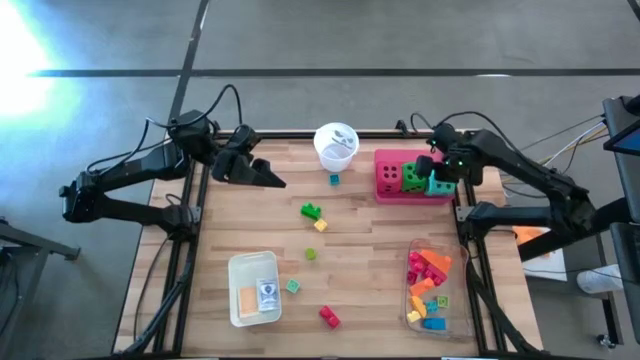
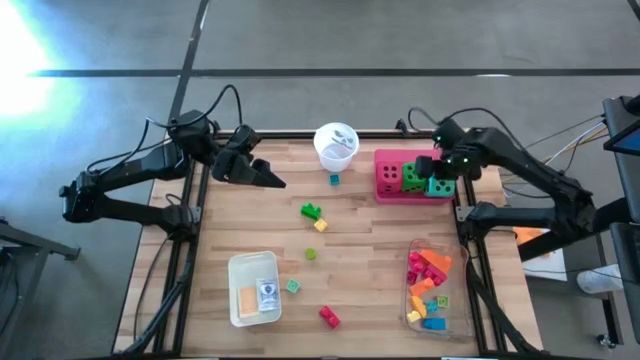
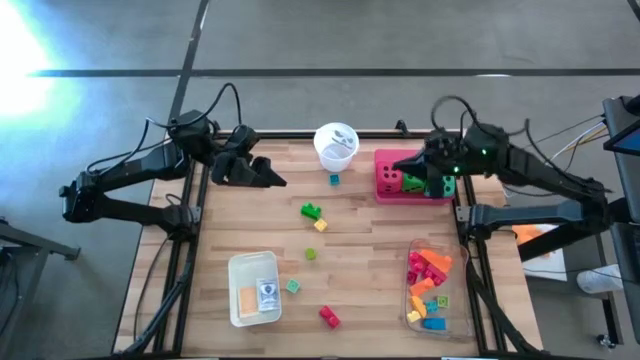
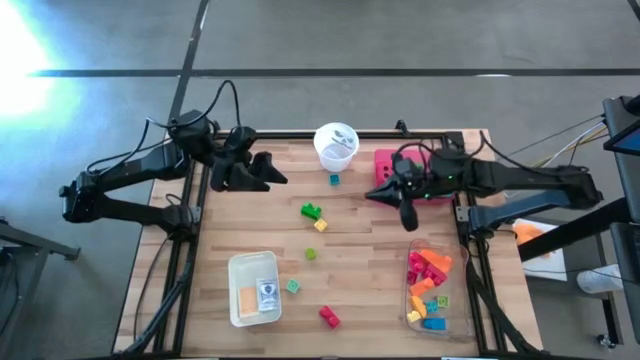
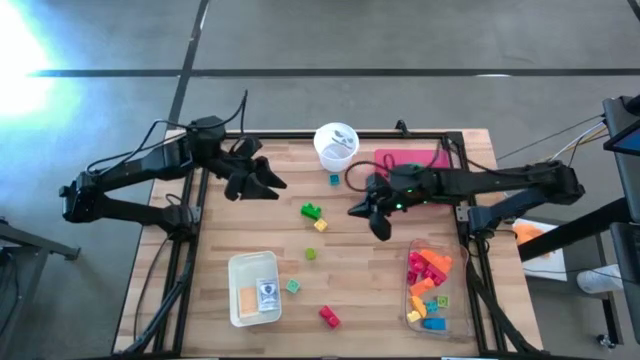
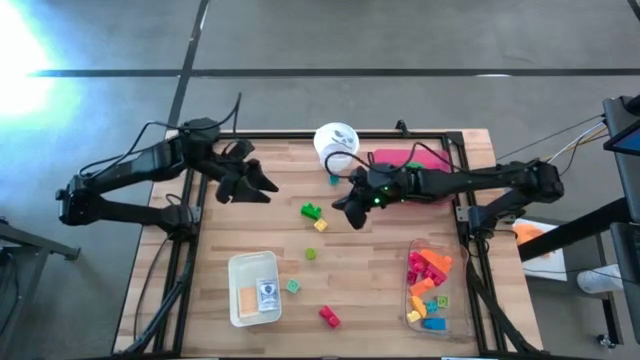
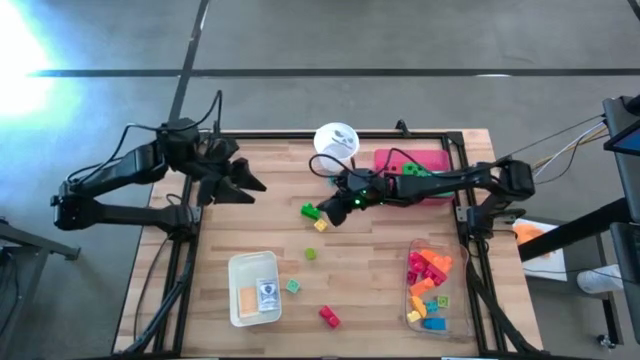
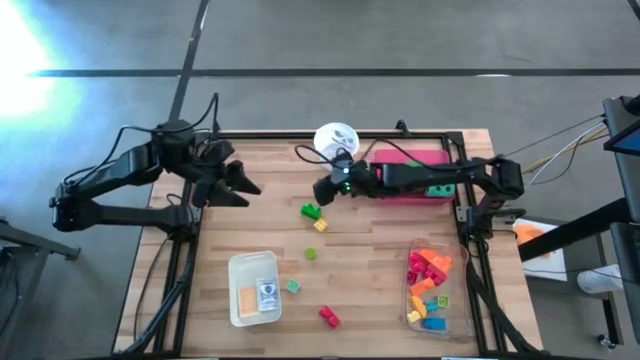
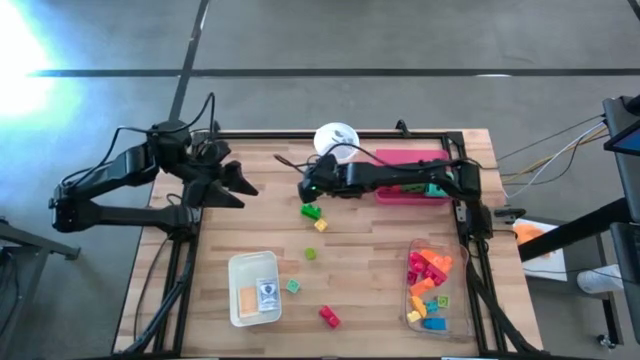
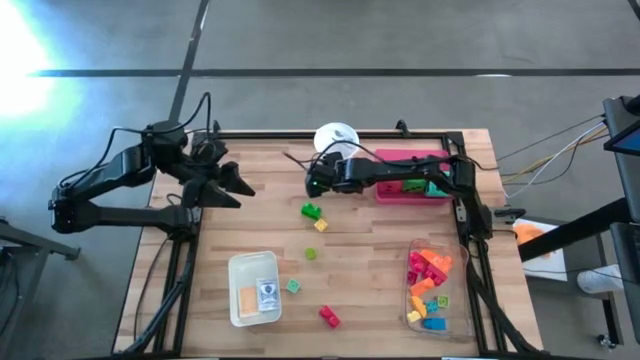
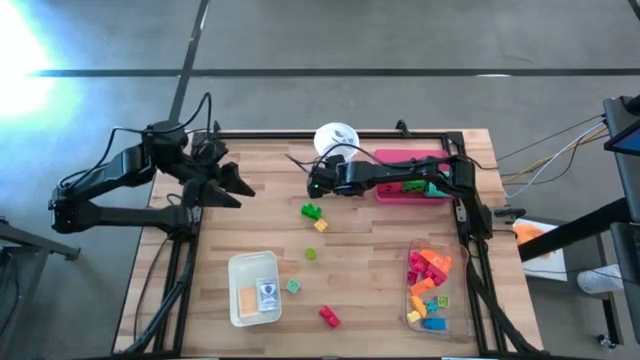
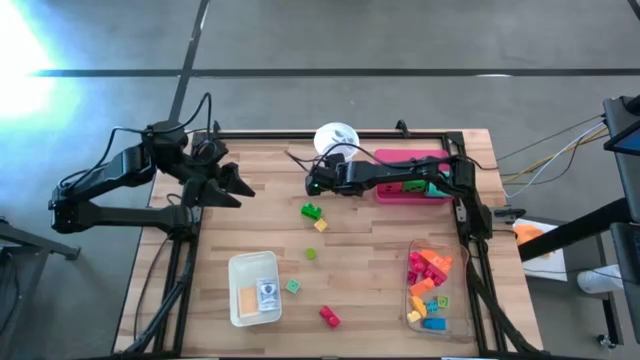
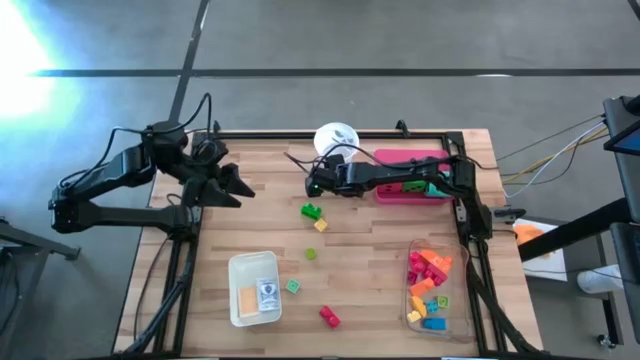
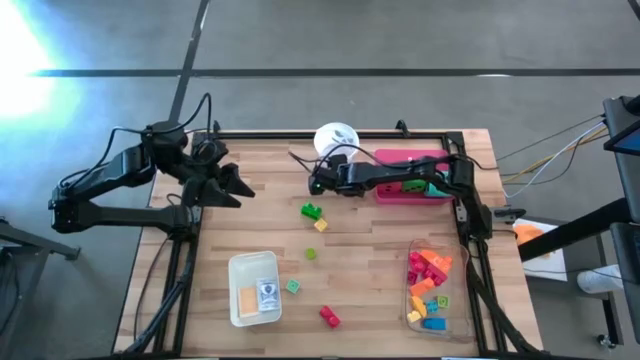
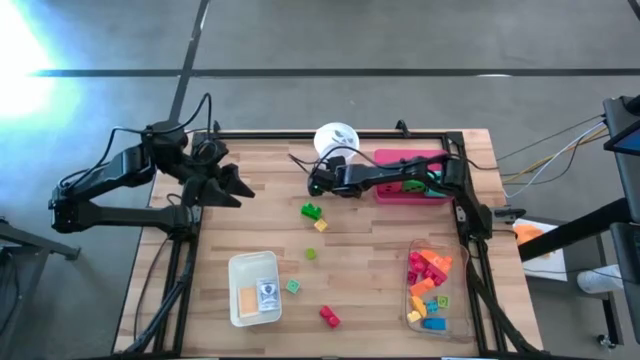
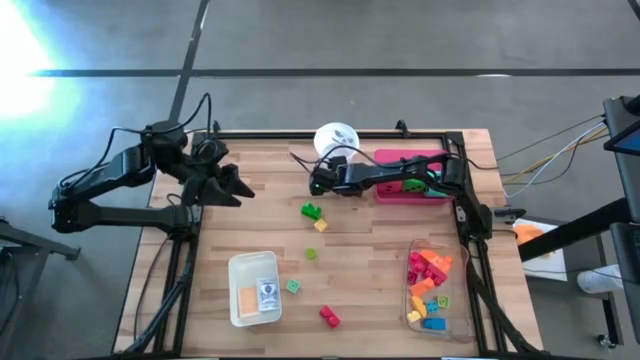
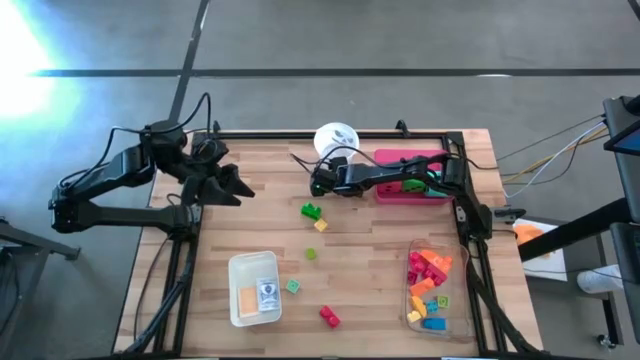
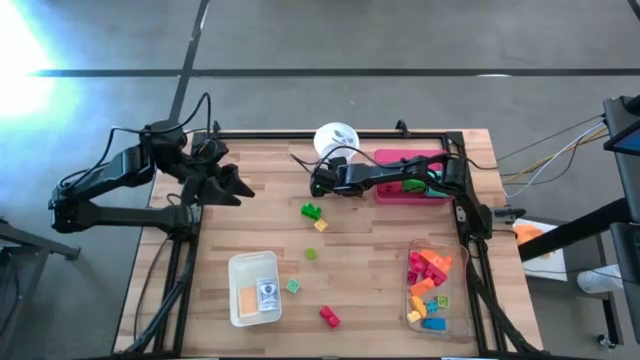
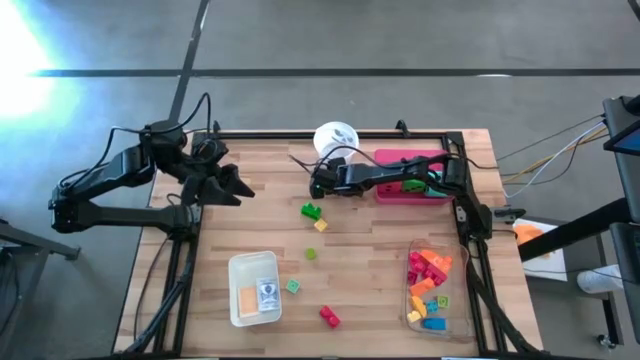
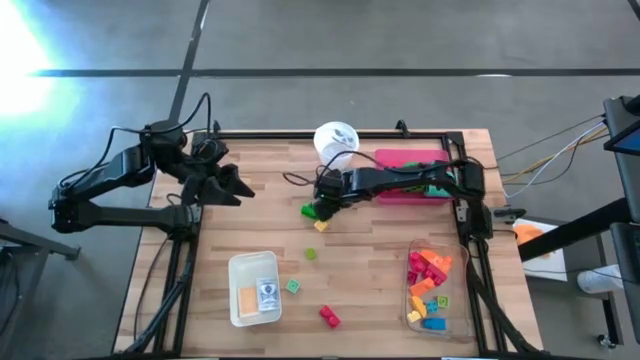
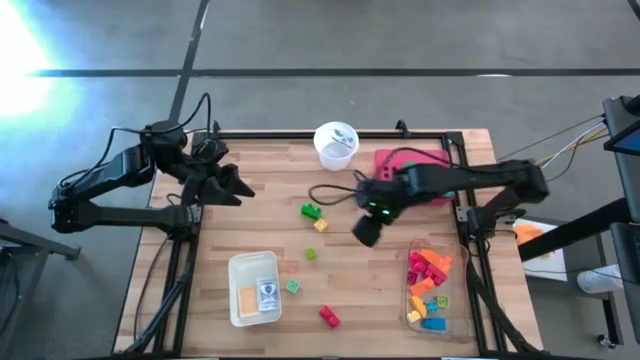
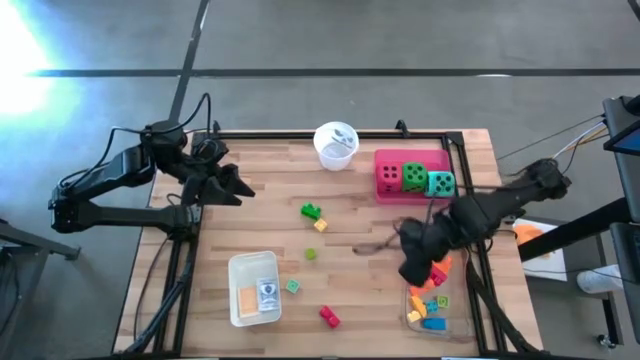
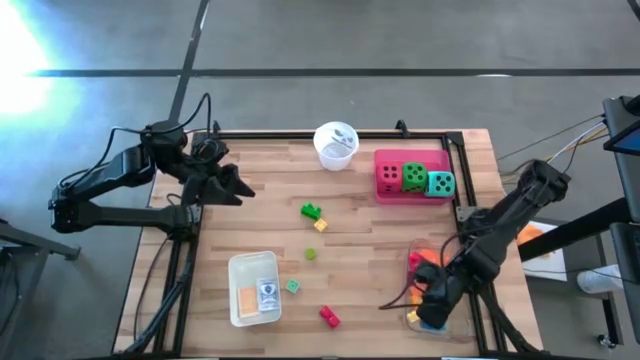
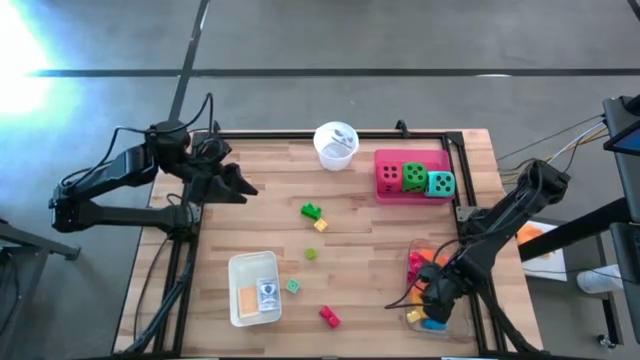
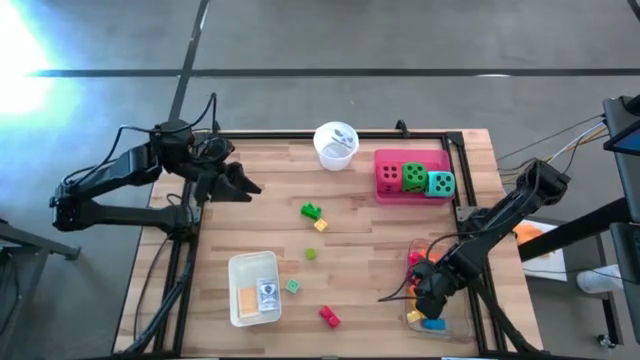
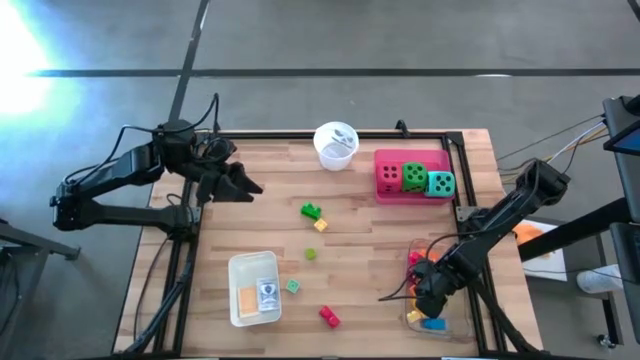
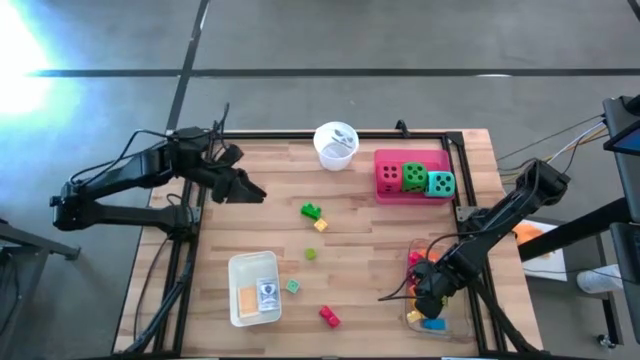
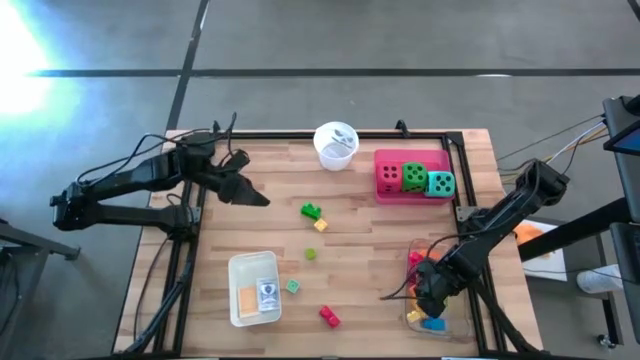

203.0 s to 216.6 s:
Task: Pick & Place Toys
Put the blue game piece into the transparent bin

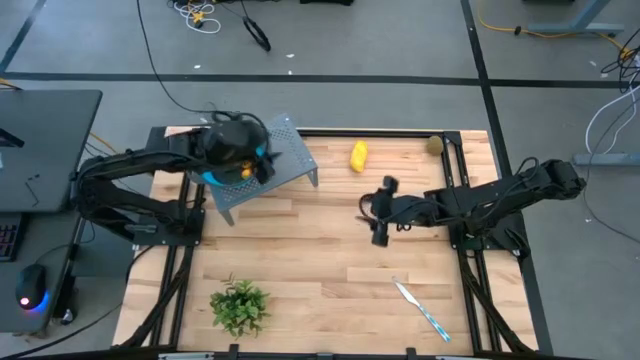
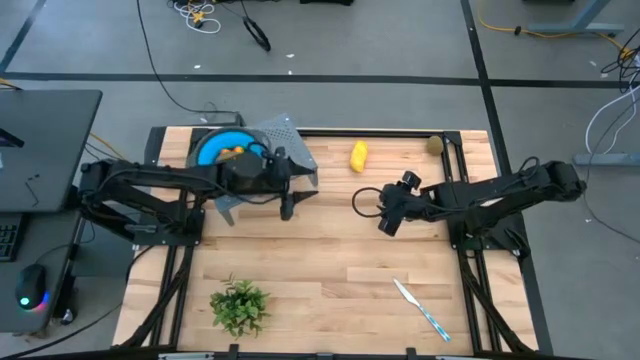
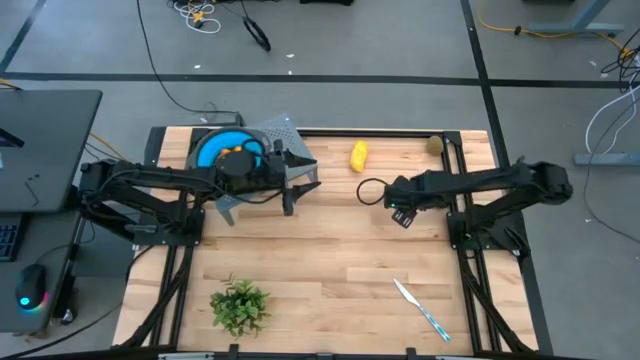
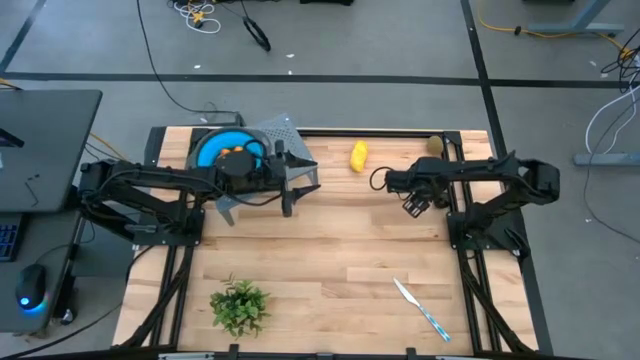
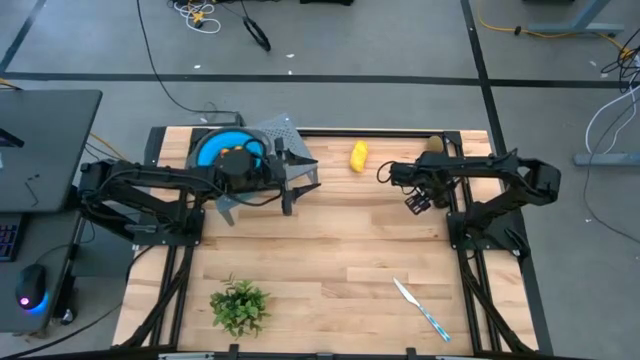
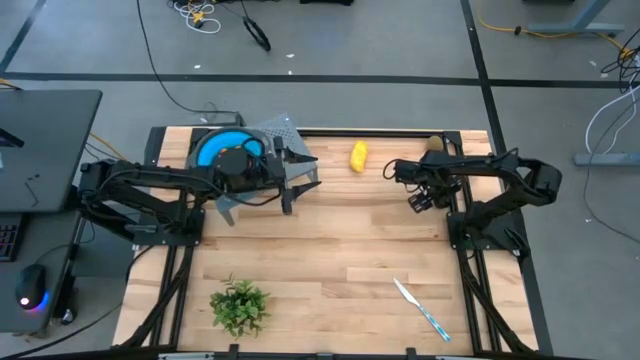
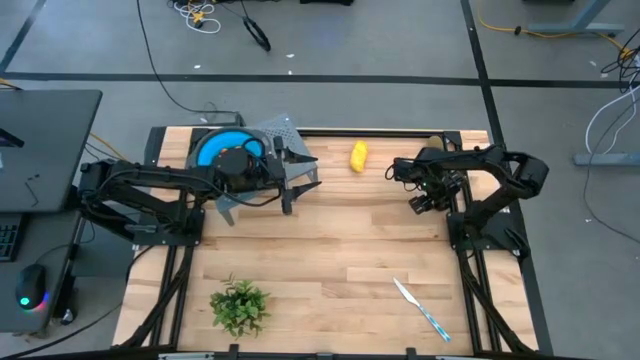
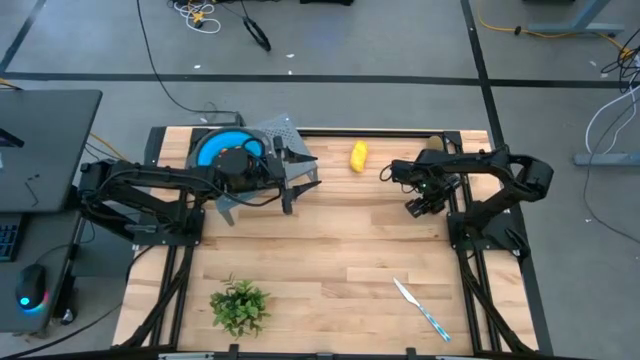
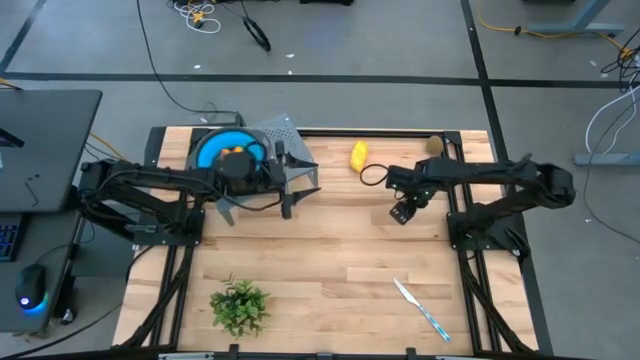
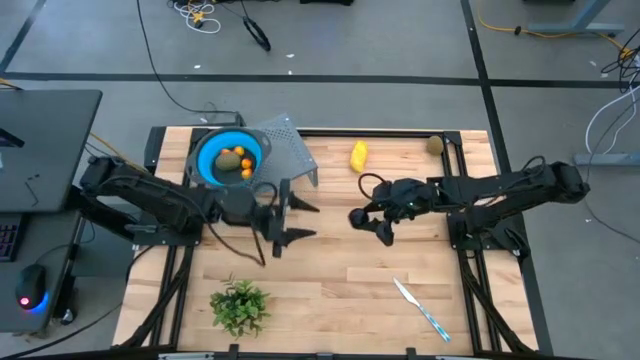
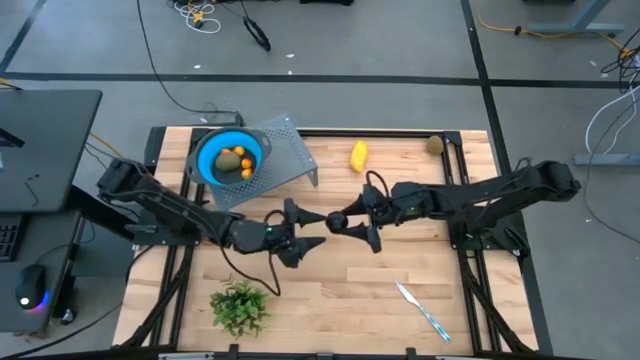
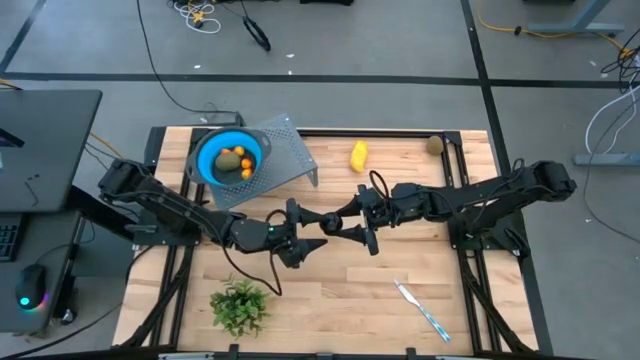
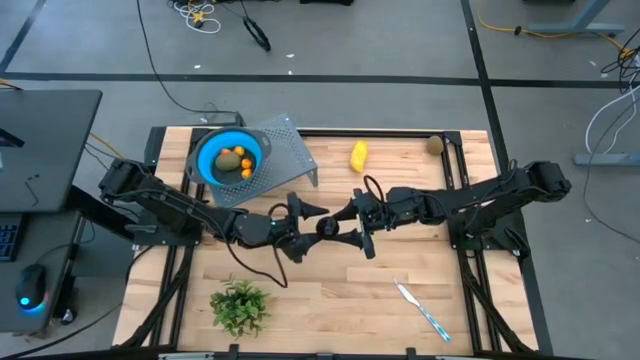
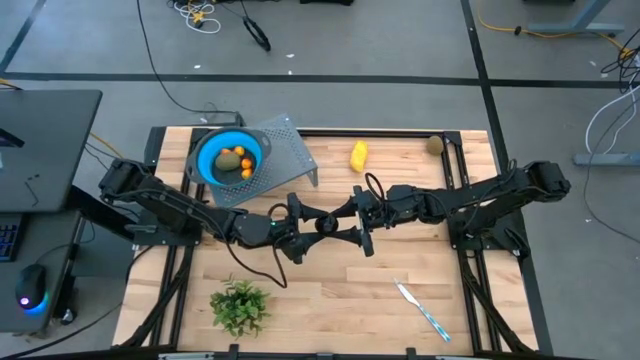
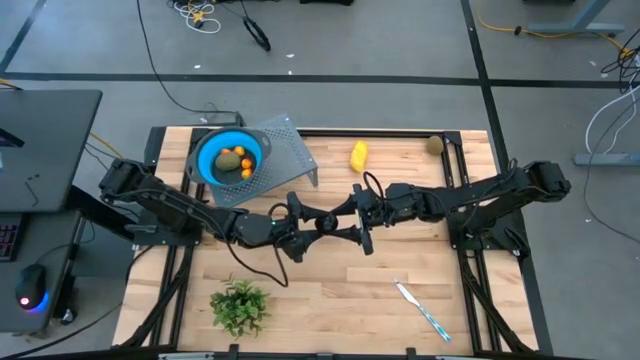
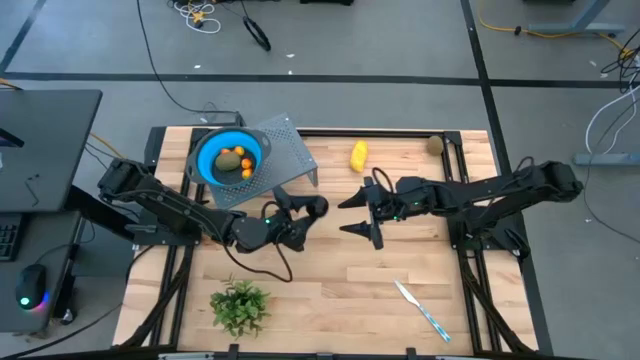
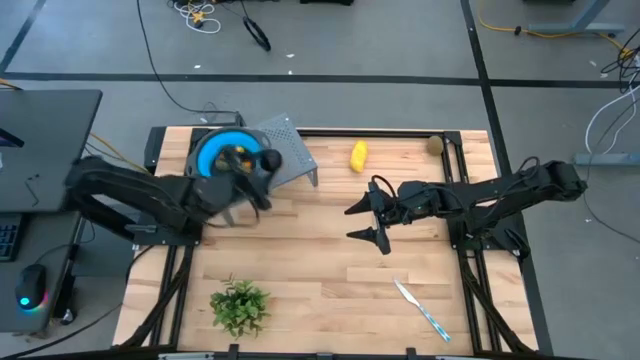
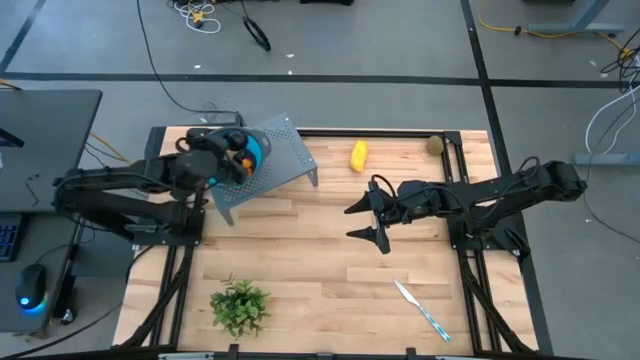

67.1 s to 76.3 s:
Task: Pick & Place Fruit
Put the black plum into the blue strainer bowl on the shelf
